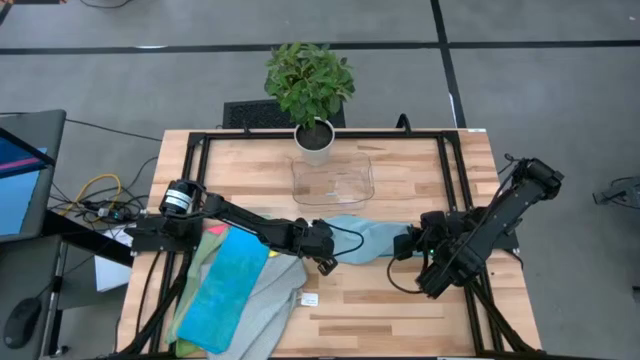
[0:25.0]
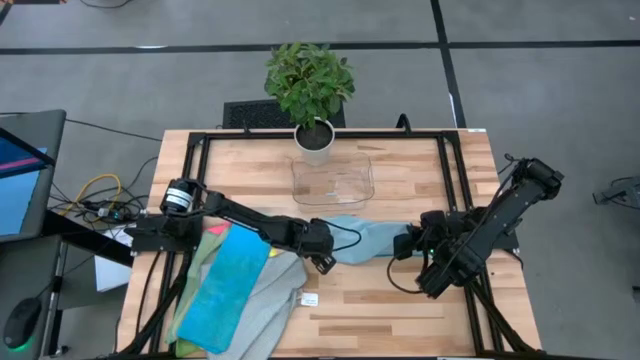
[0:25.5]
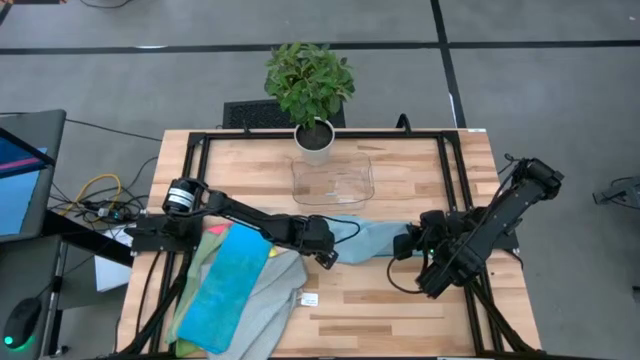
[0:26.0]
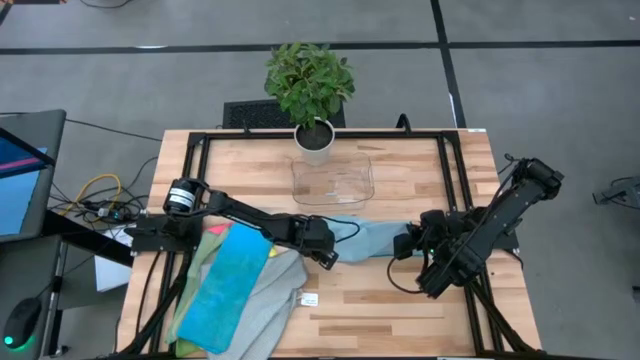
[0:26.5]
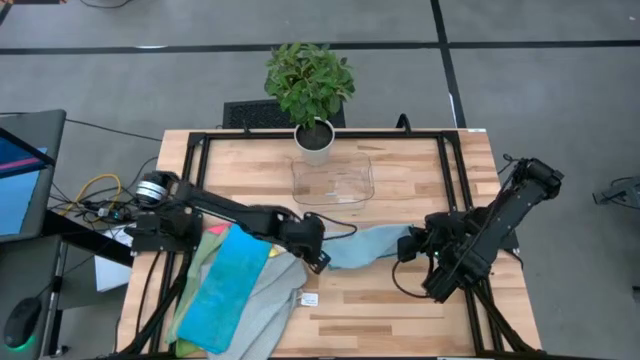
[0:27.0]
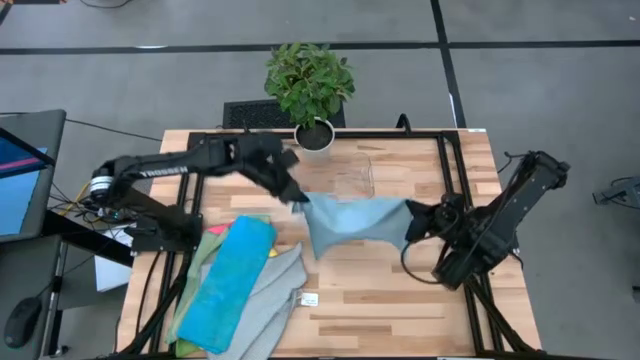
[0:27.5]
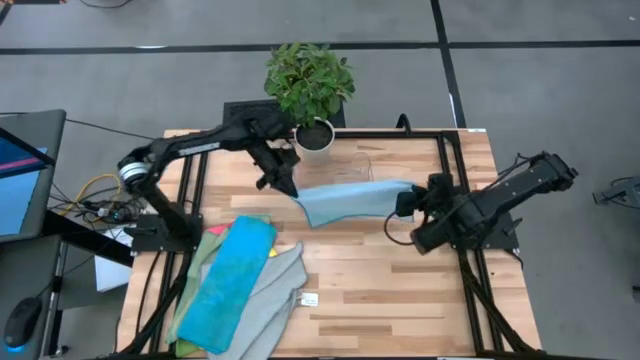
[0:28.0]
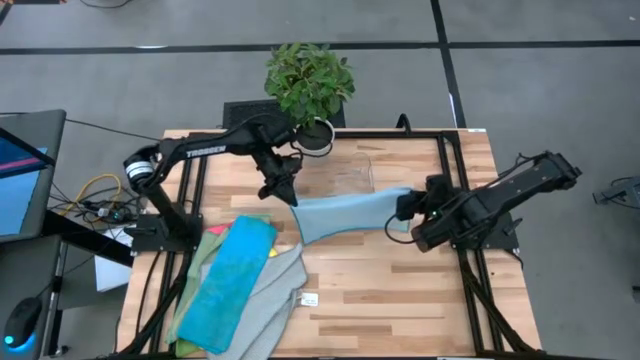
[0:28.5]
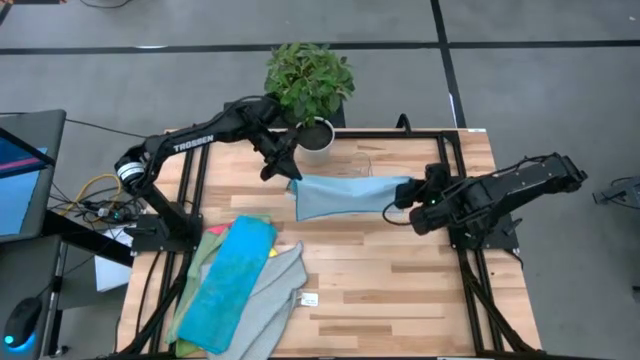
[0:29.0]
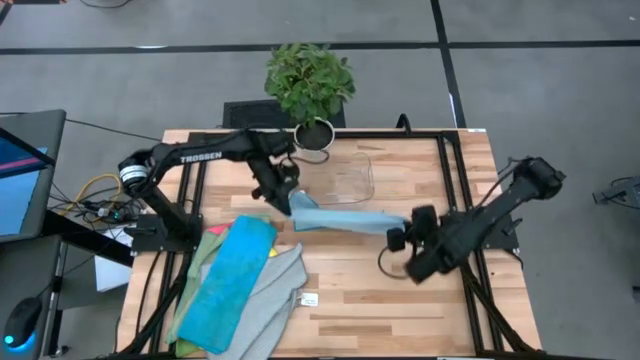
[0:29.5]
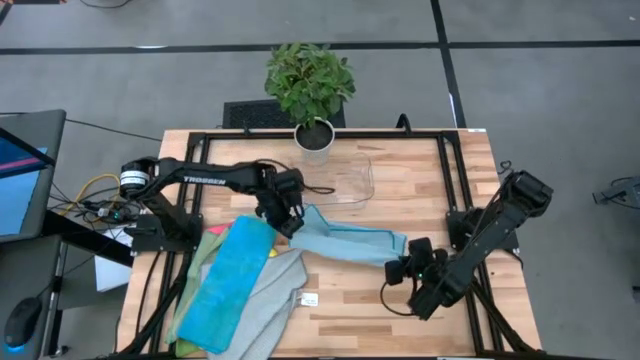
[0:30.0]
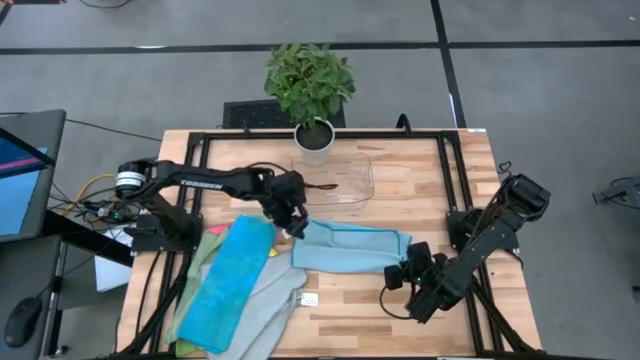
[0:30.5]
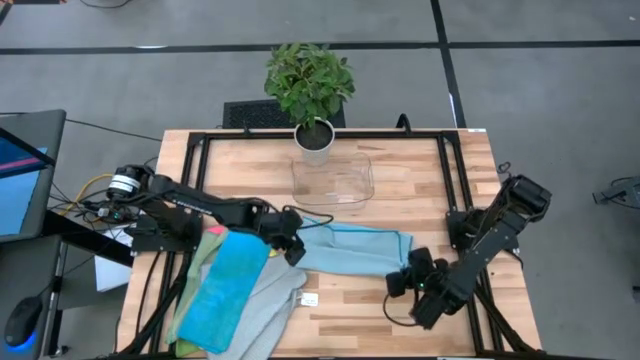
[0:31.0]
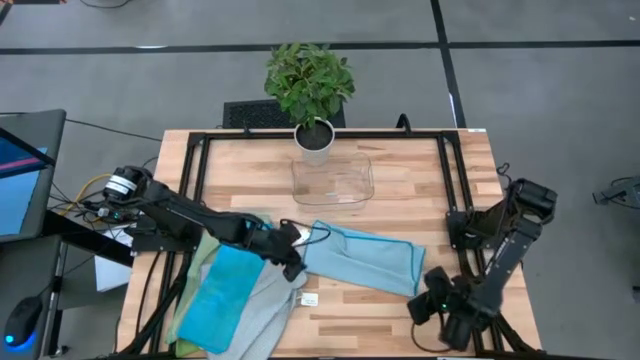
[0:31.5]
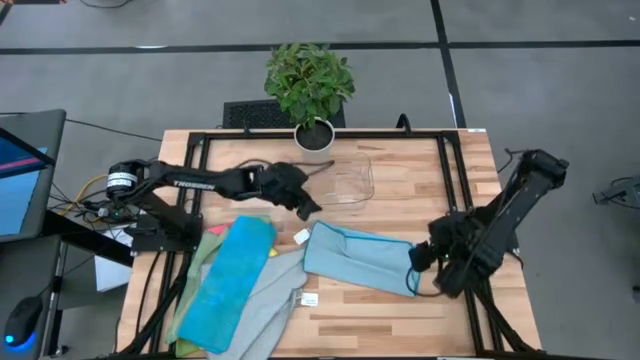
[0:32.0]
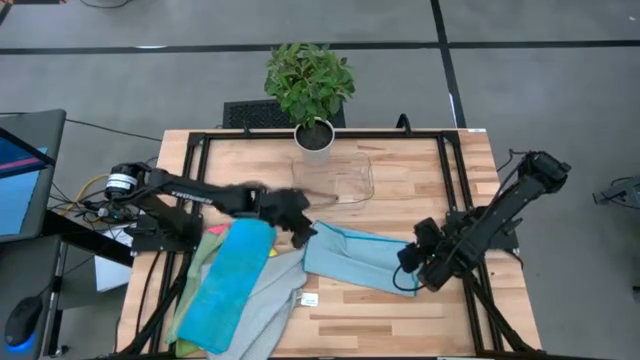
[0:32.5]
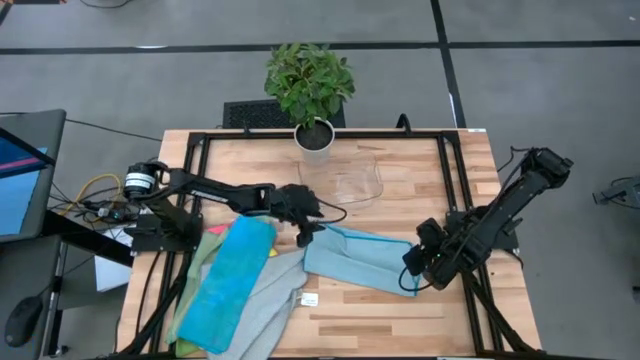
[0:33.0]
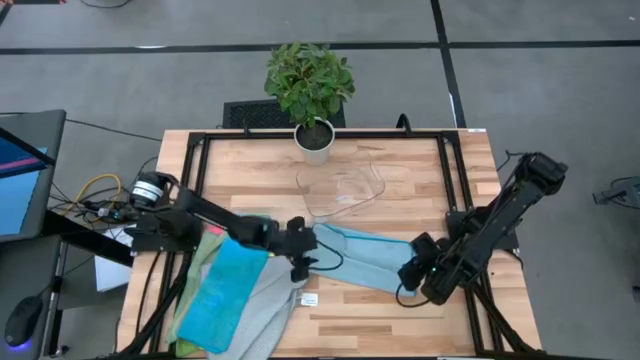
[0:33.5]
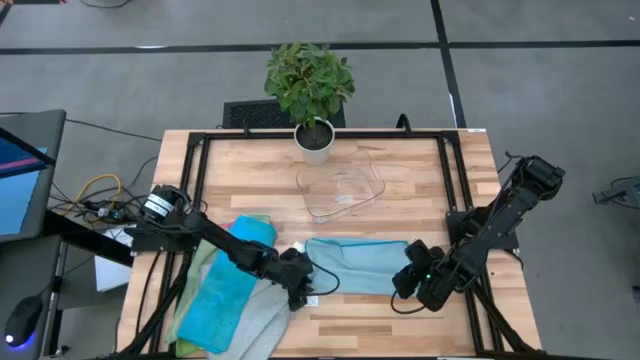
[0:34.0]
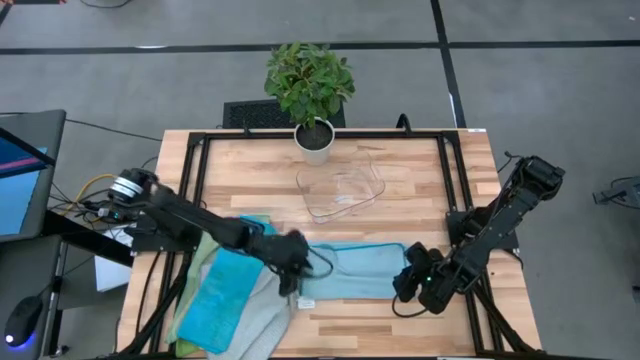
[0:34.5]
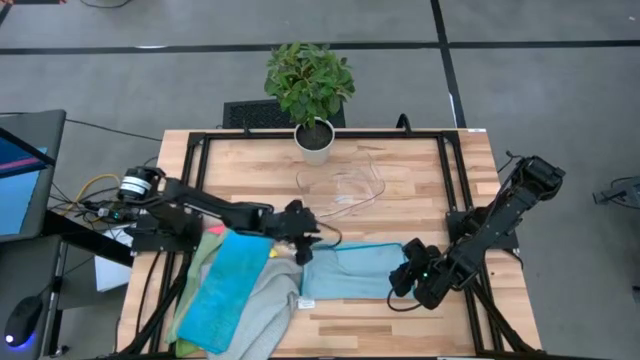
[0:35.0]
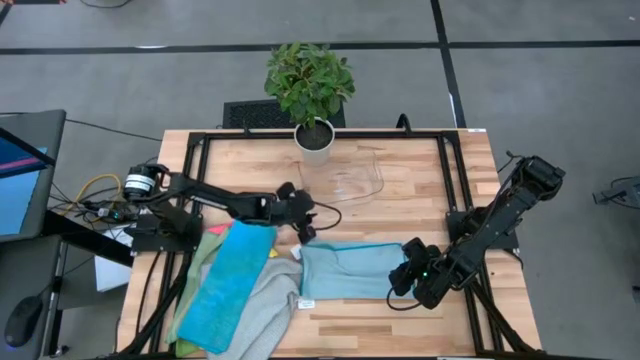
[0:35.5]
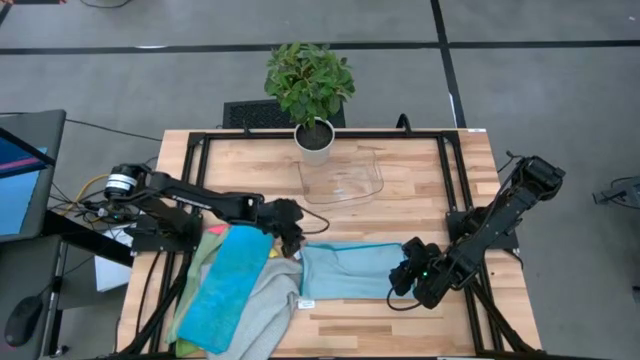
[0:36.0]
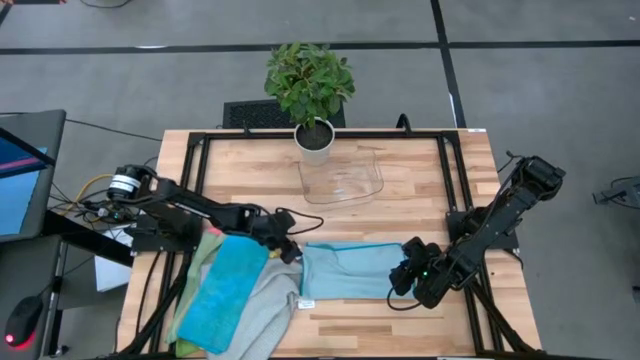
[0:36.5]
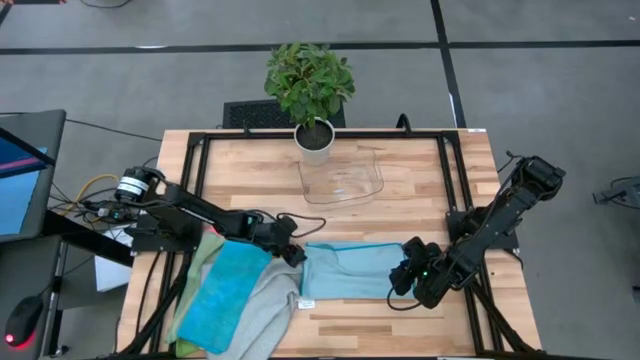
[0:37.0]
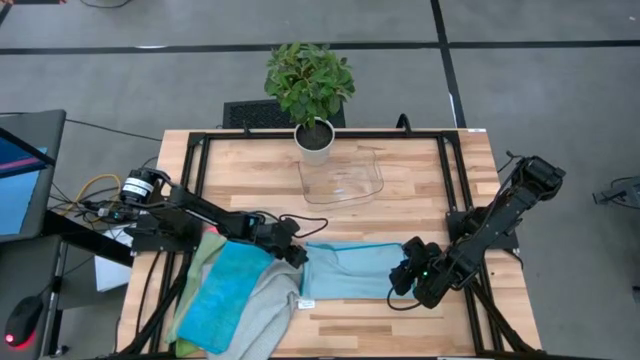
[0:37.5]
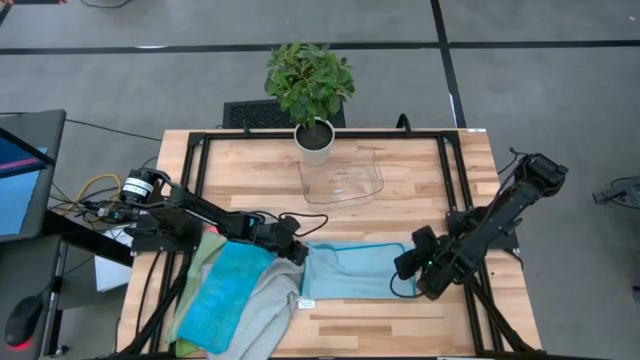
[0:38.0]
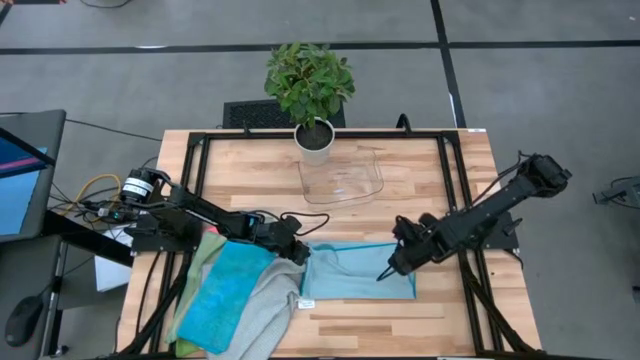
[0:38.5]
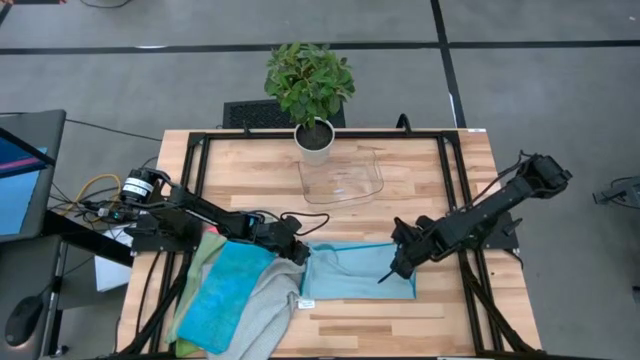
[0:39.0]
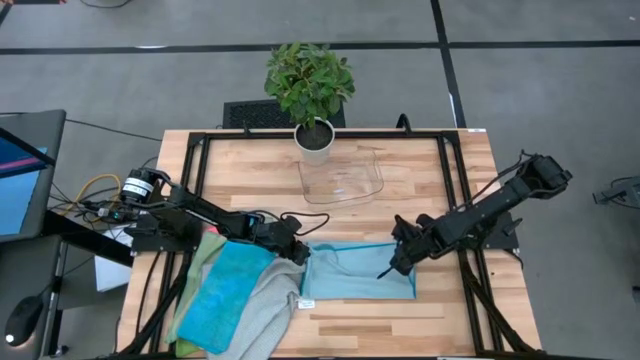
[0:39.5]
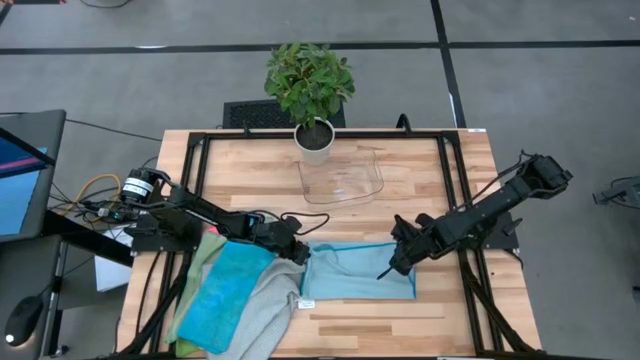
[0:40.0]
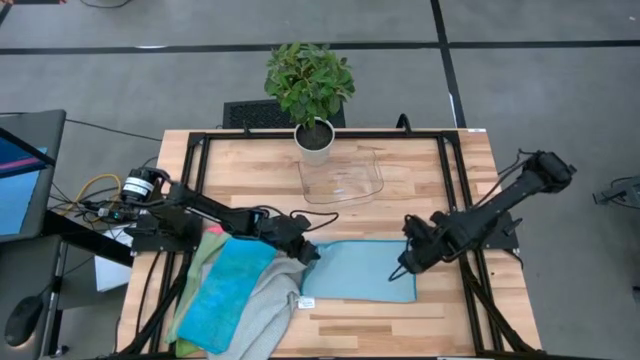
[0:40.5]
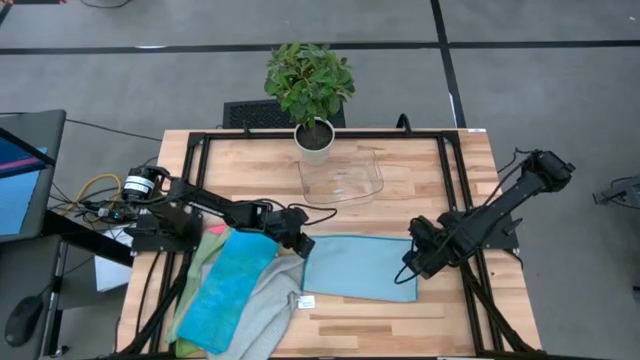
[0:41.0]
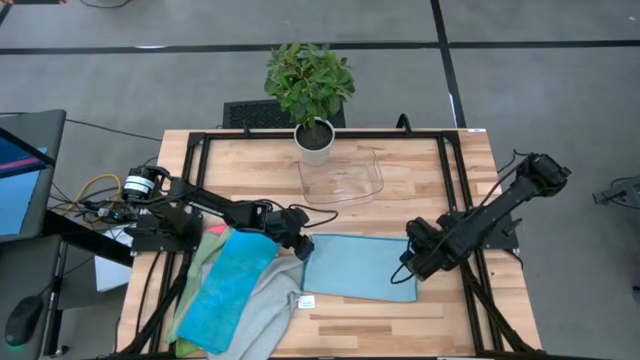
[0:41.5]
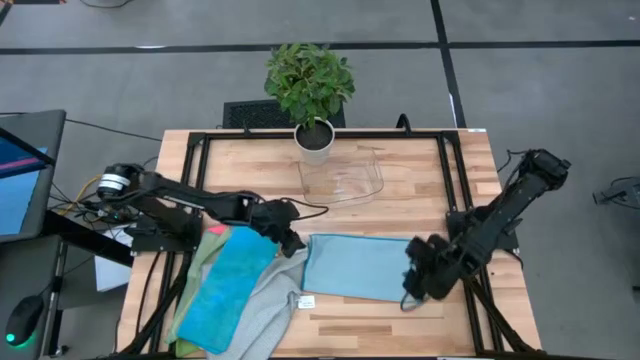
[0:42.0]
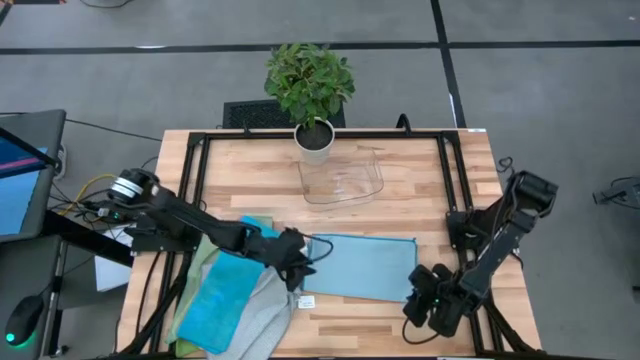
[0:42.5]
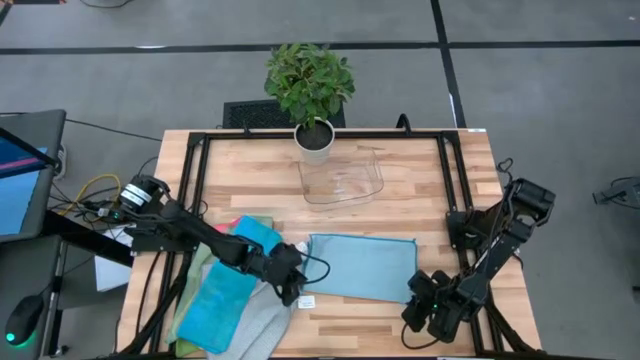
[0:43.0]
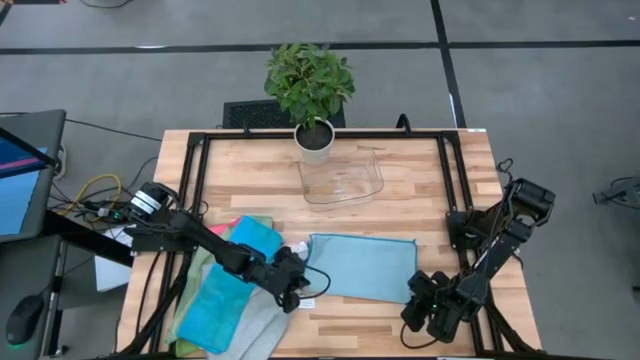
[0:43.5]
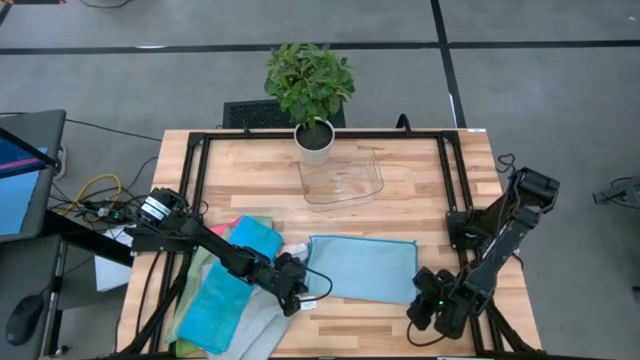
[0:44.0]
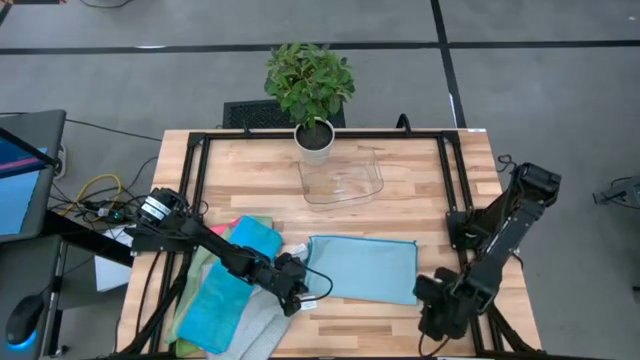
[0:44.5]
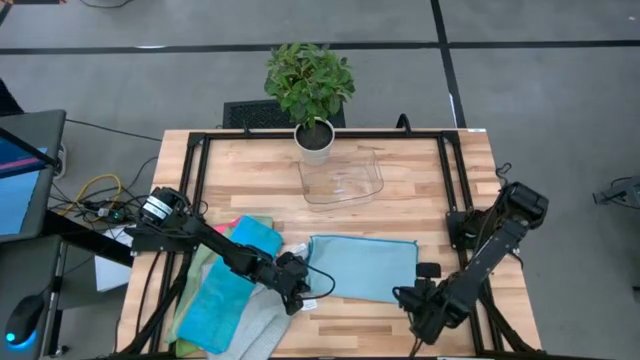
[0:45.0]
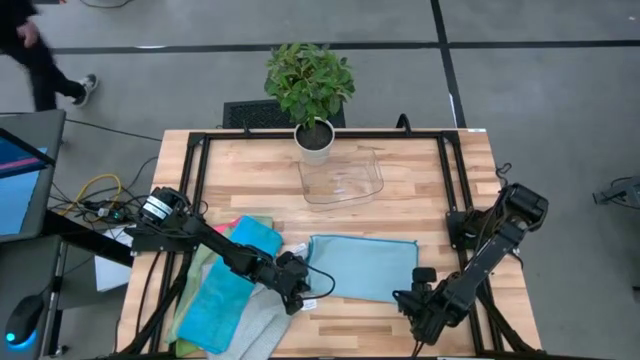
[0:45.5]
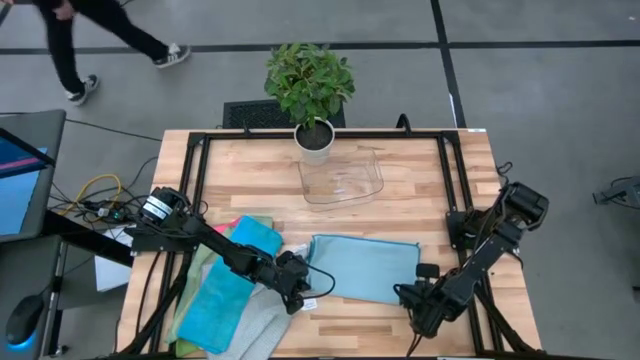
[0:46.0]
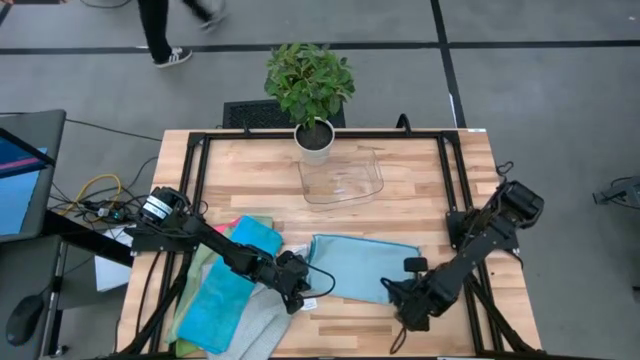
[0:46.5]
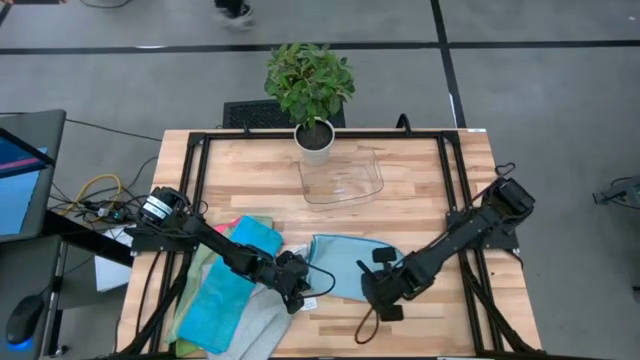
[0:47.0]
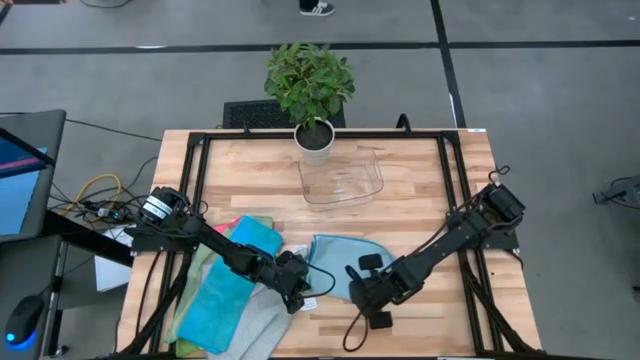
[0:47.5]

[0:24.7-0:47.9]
Task: Fold microfiber towels
Fold the light blue microfiber cloth
